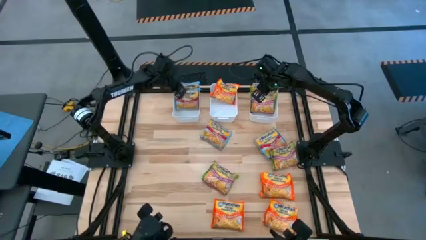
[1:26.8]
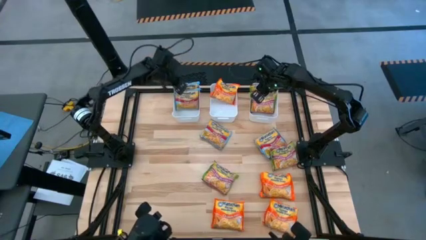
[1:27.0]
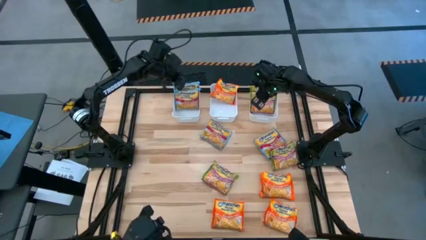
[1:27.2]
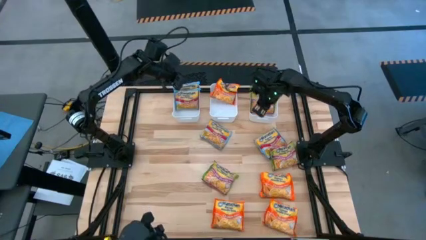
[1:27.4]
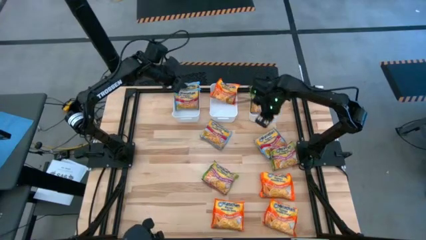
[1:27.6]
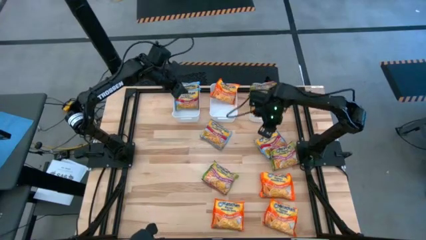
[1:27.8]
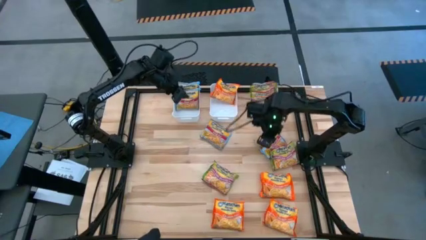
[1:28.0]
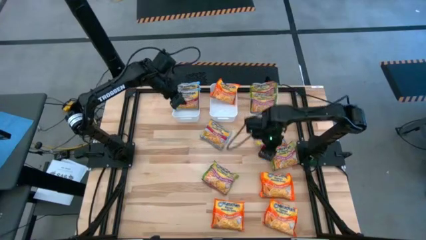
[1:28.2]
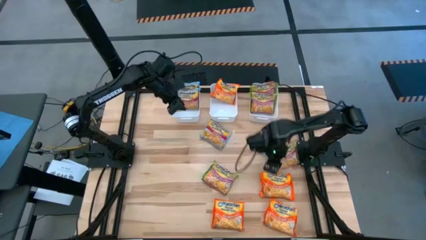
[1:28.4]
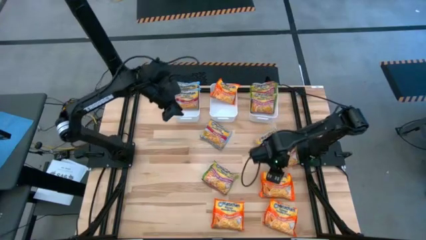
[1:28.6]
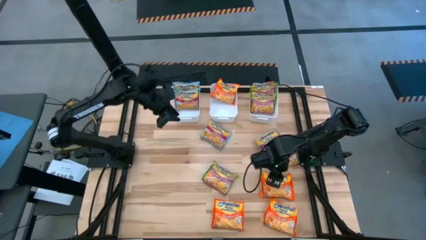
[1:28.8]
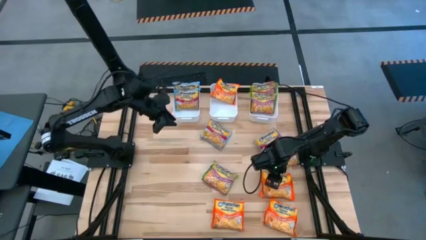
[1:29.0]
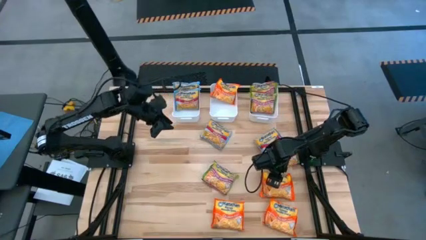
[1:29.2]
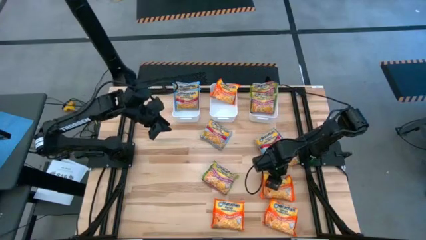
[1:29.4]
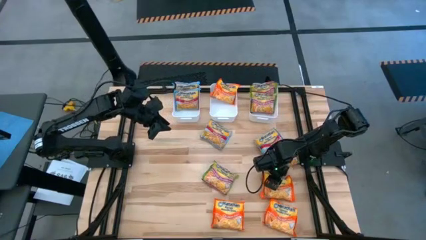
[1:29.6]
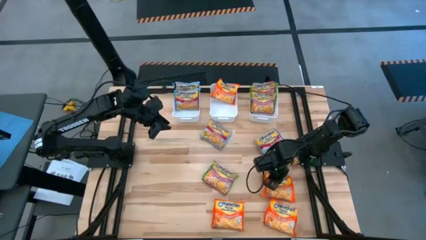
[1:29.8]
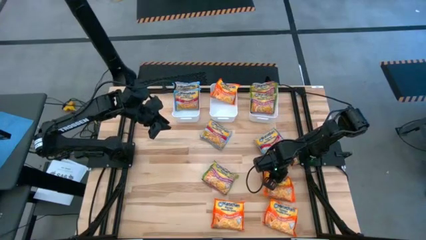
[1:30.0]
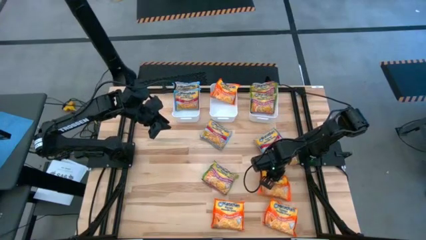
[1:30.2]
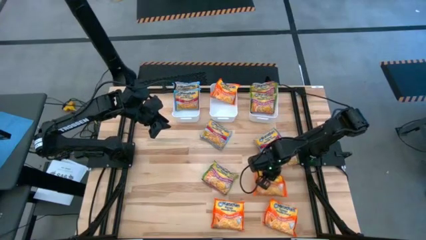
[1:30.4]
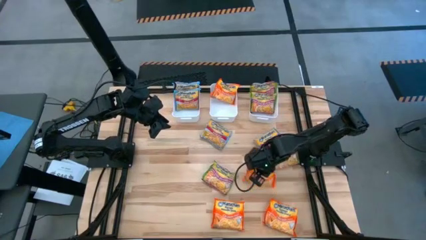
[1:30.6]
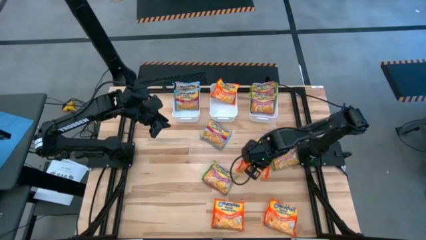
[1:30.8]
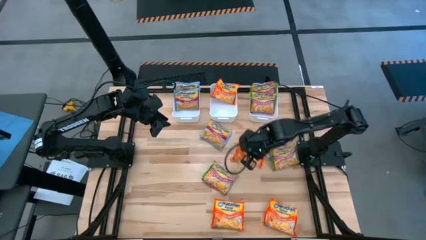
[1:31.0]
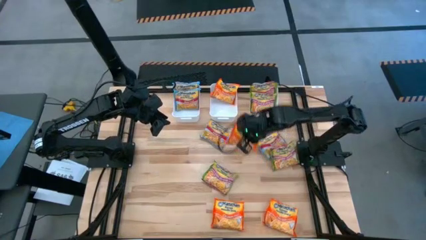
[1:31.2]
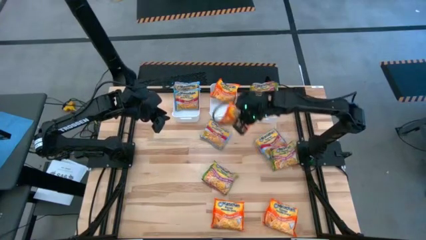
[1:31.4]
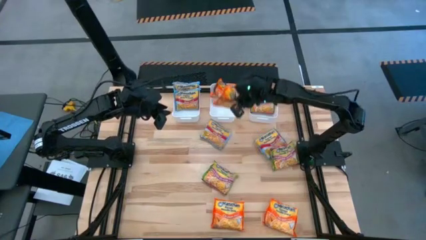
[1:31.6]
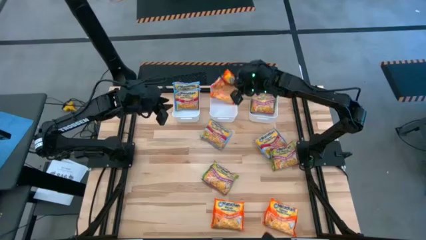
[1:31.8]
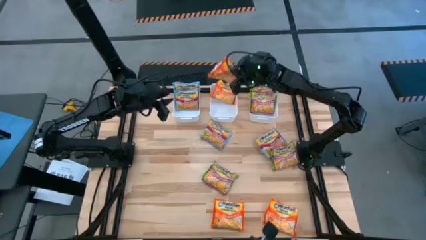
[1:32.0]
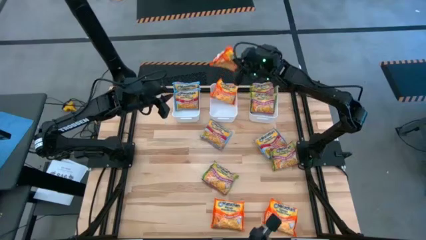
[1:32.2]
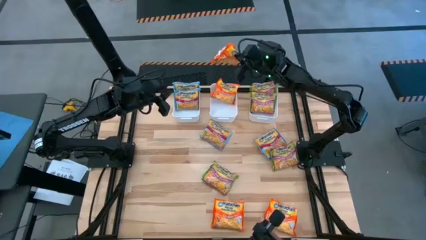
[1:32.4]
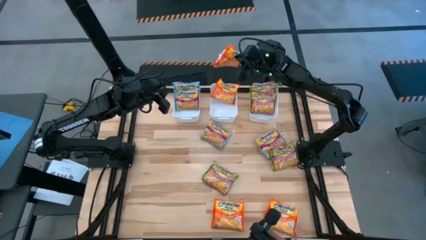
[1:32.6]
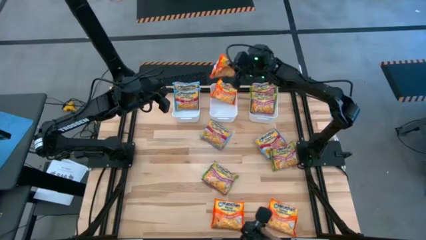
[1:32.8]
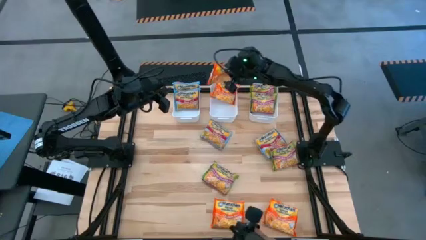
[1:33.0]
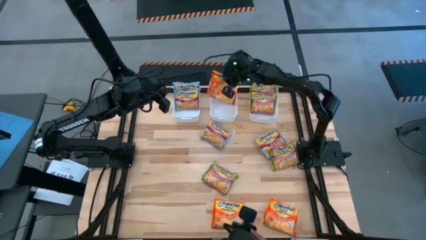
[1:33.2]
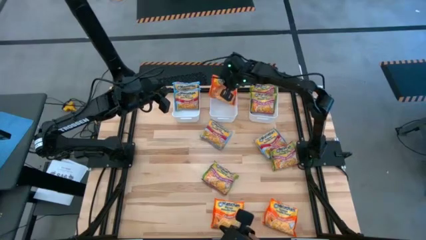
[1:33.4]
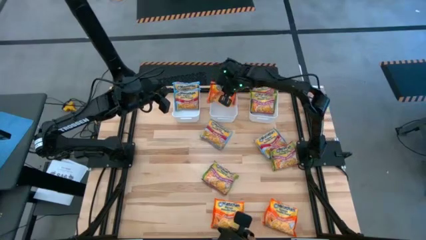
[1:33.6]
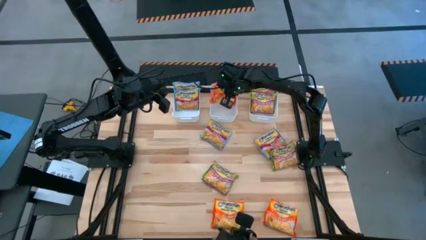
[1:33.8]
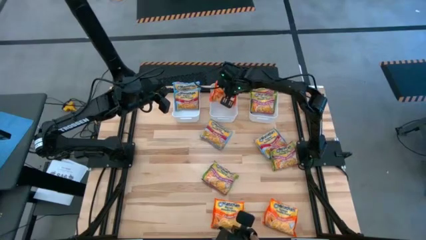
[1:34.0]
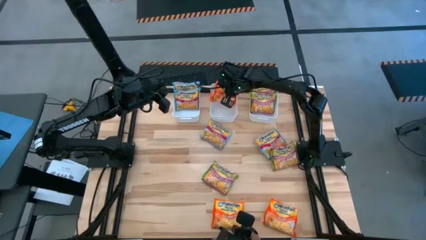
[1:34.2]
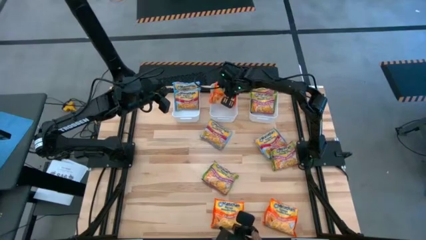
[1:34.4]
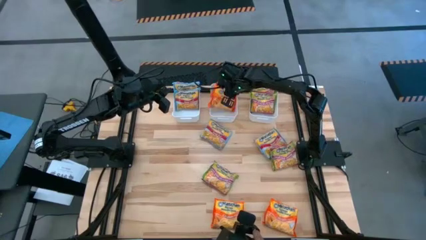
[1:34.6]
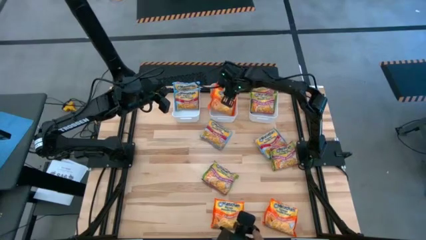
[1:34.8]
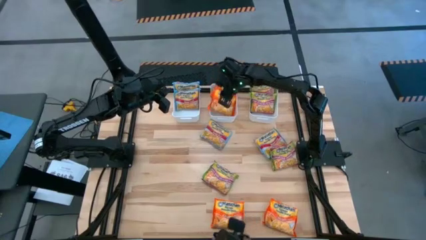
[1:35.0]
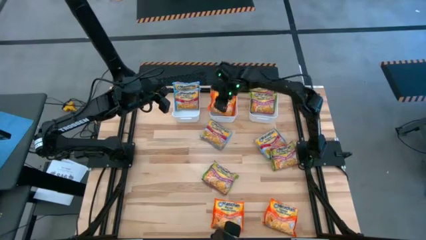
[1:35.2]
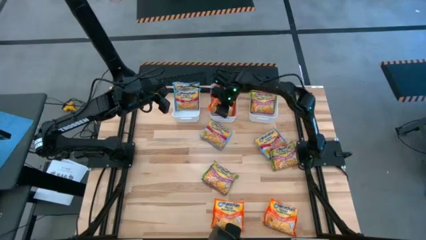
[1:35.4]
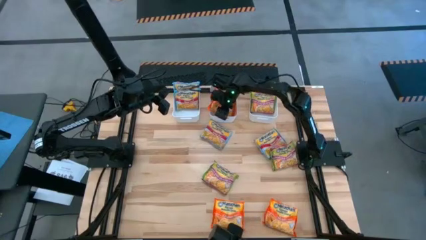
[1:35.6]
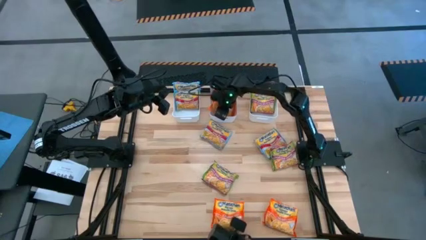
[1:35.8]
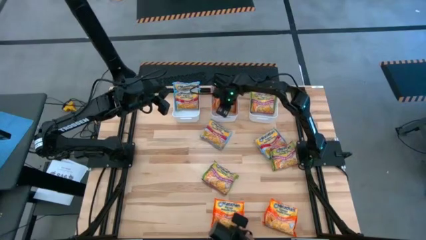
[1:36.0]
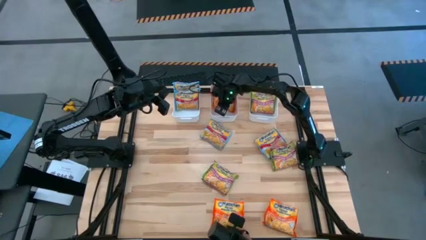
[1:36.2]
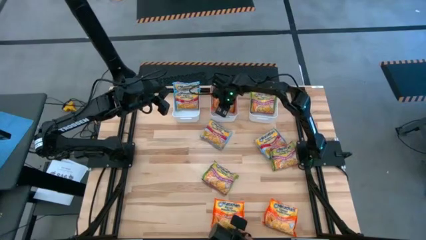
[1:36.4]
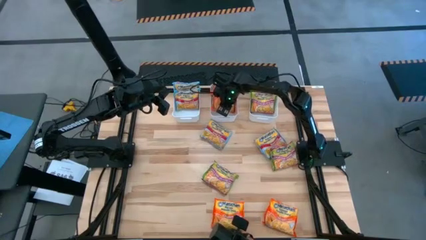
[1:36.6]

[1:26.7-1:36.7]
Task: Sort Maruchan noodles
Put the orange noodle pack into the middle white bin
